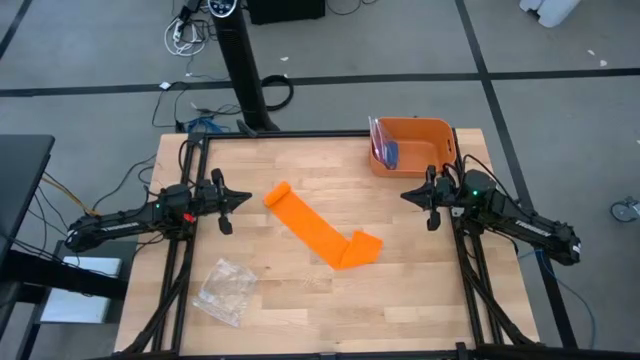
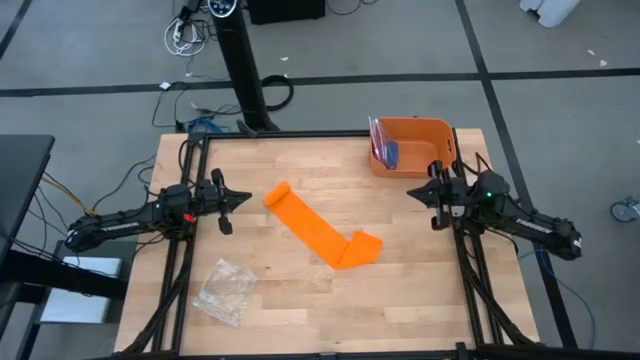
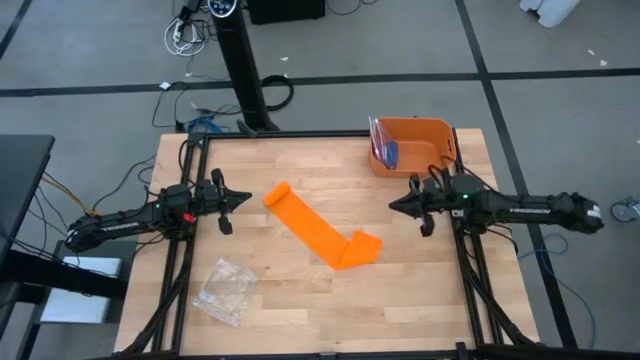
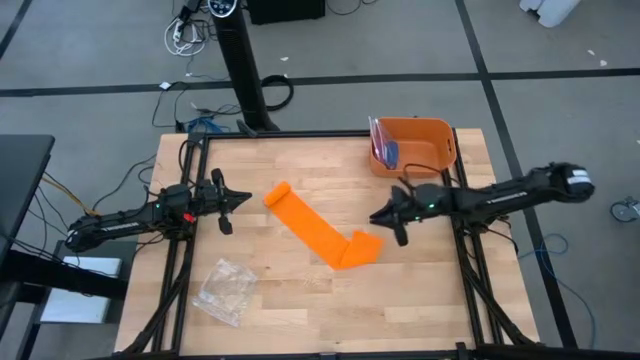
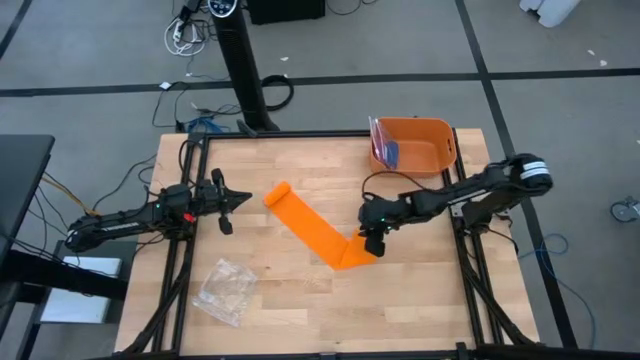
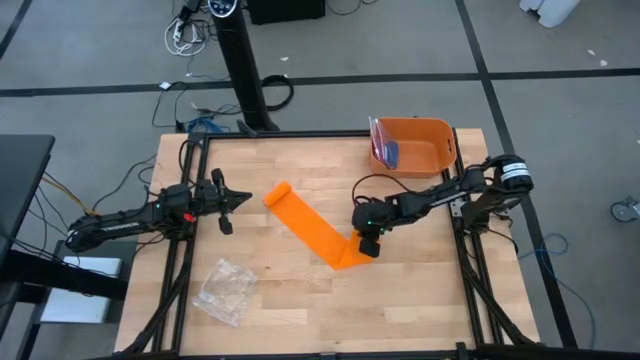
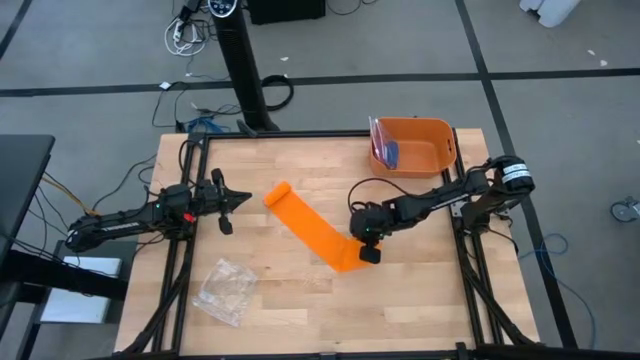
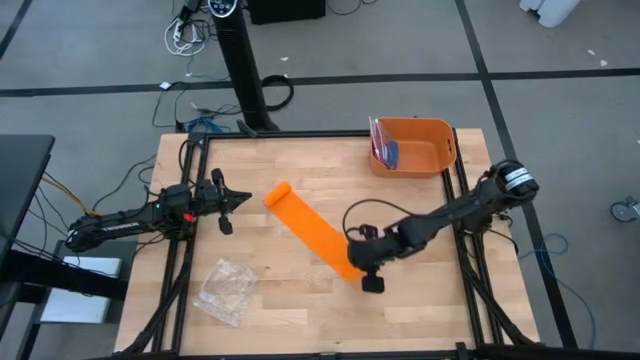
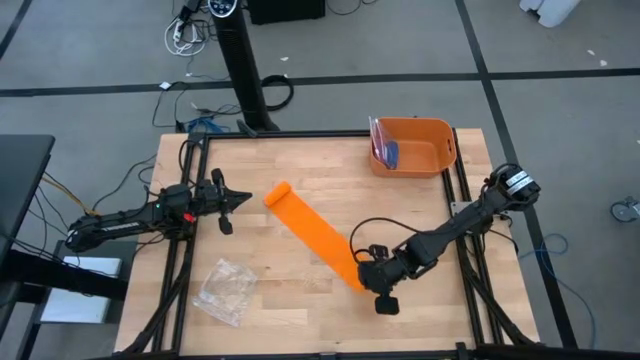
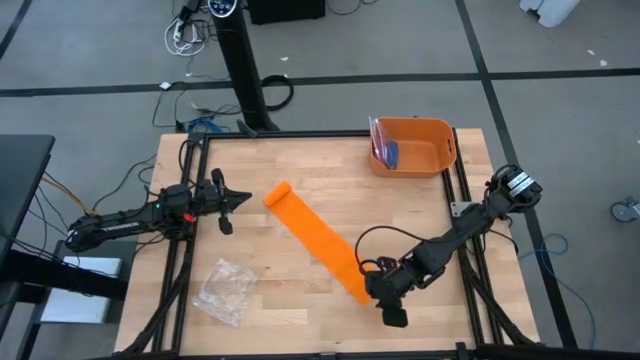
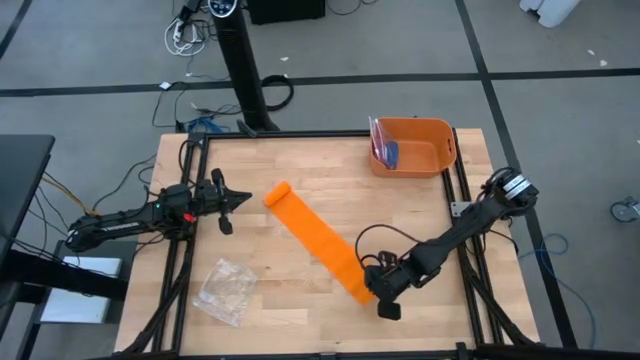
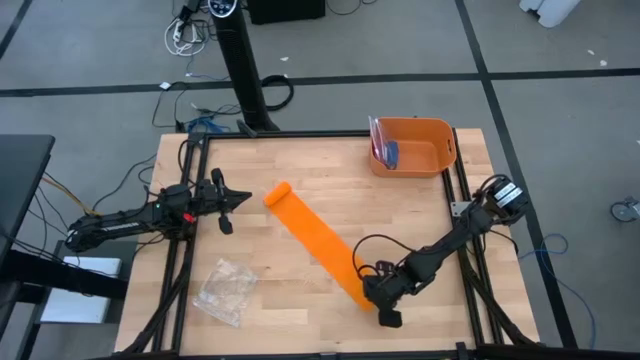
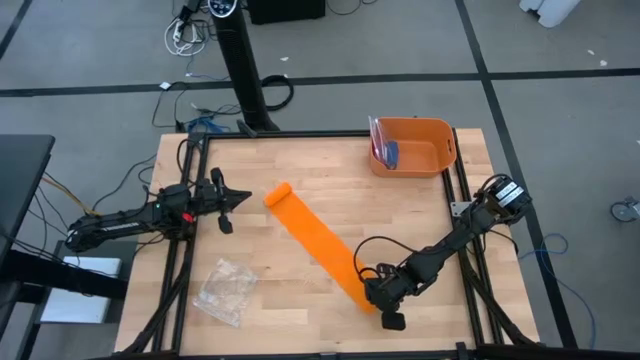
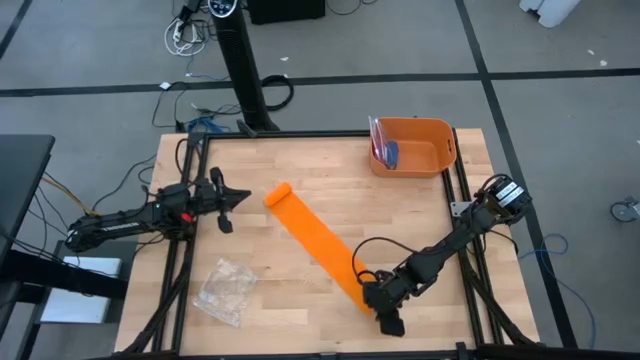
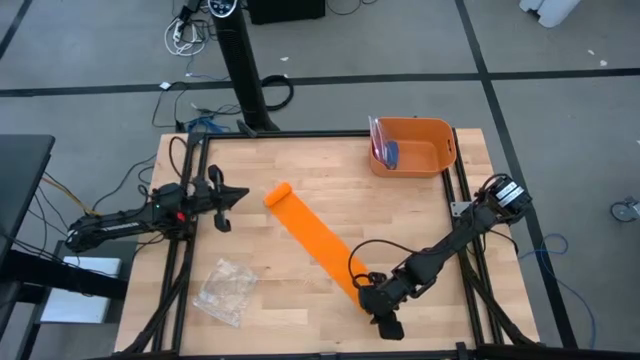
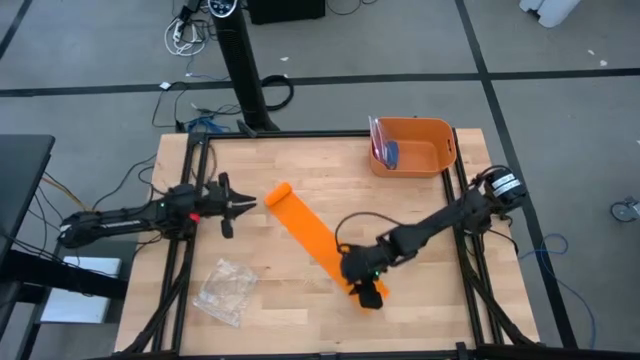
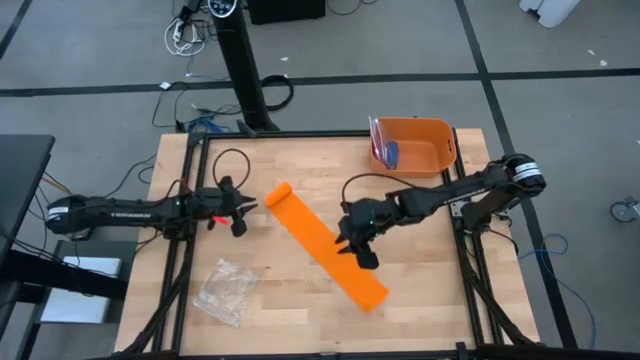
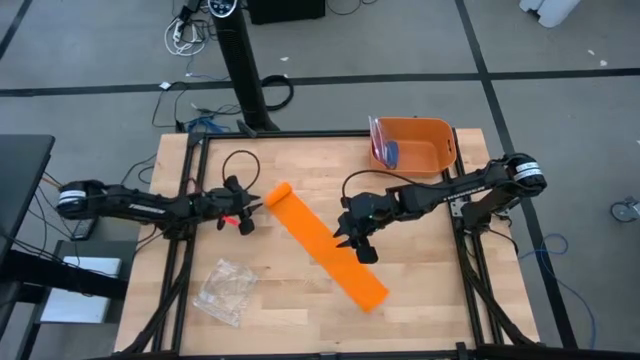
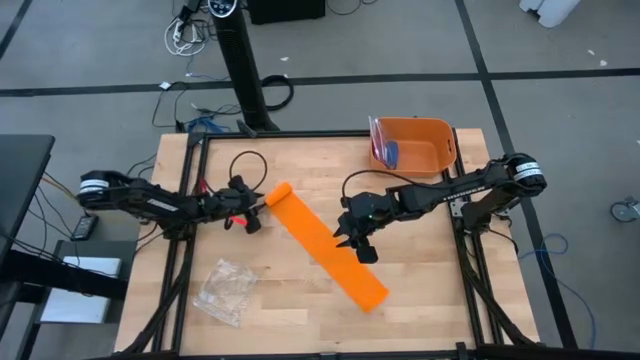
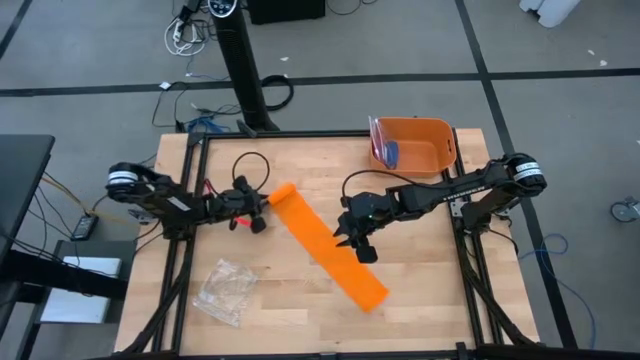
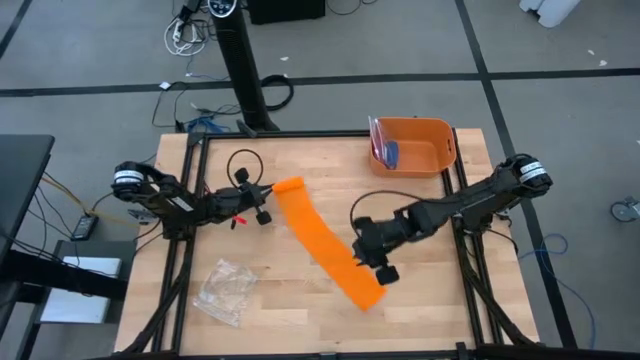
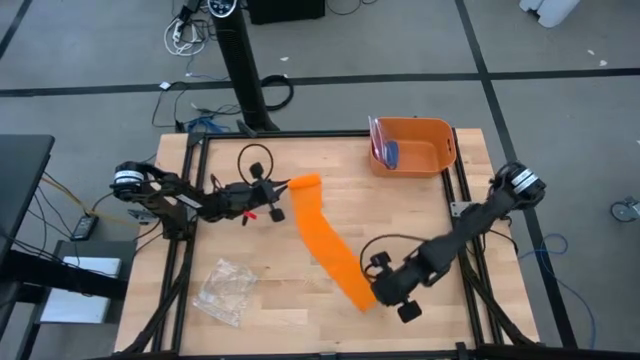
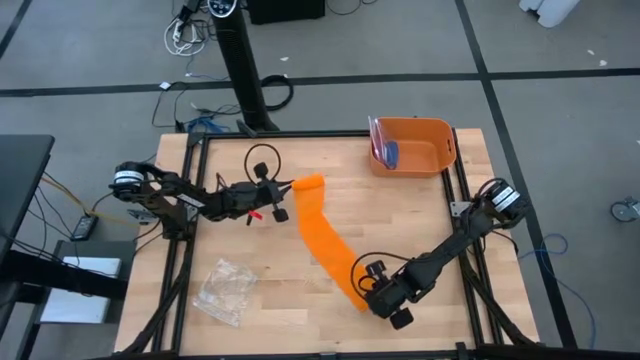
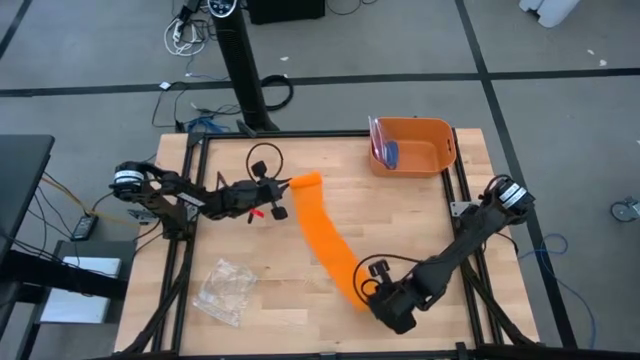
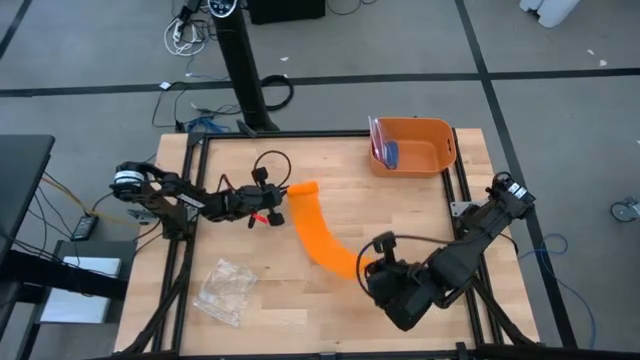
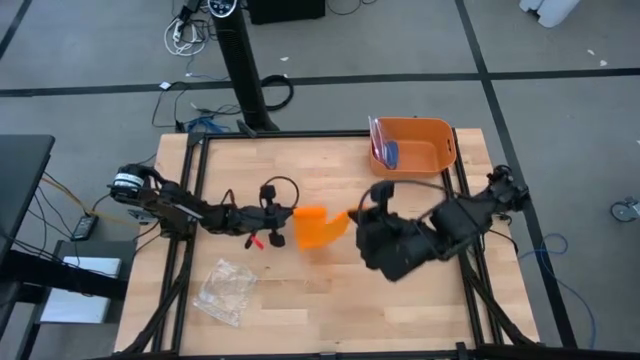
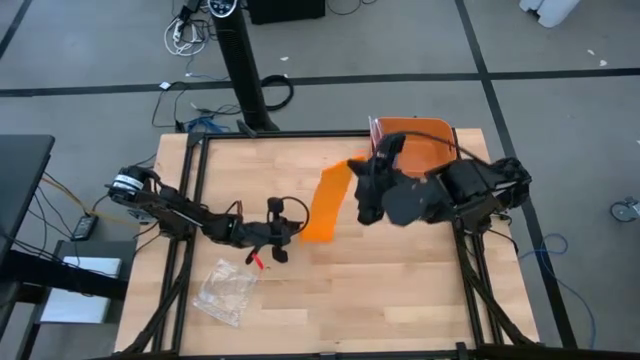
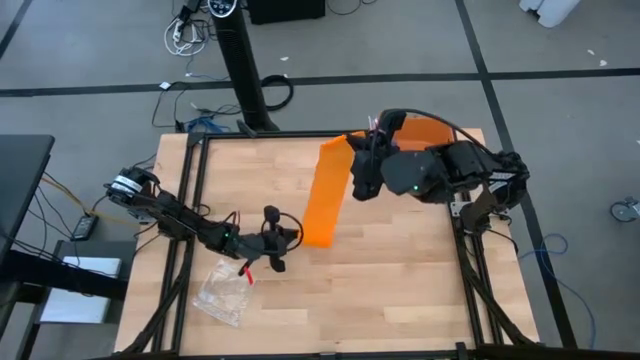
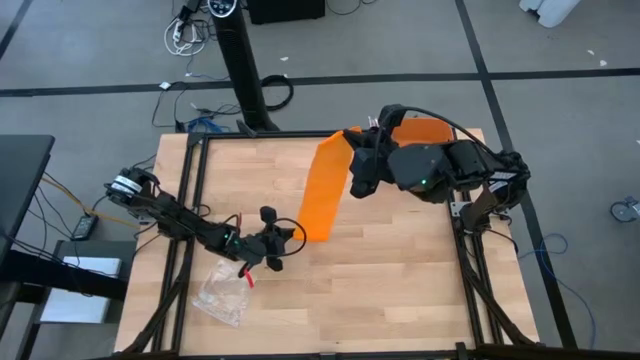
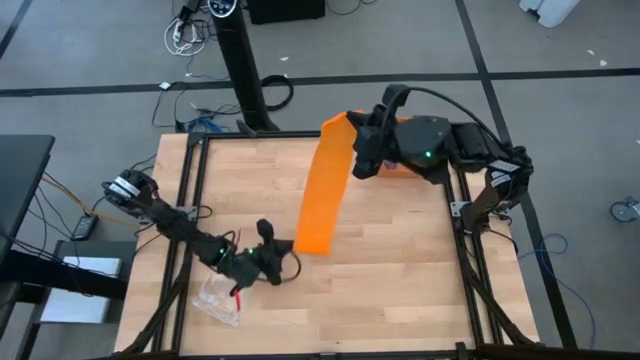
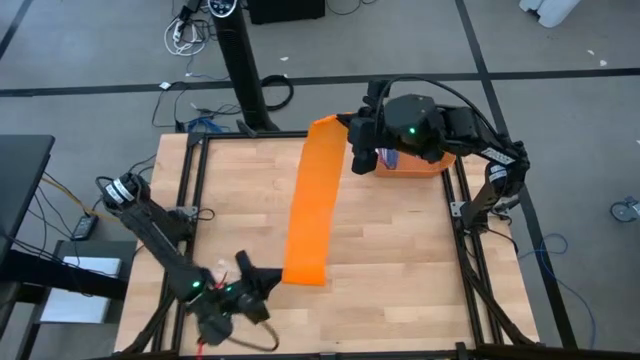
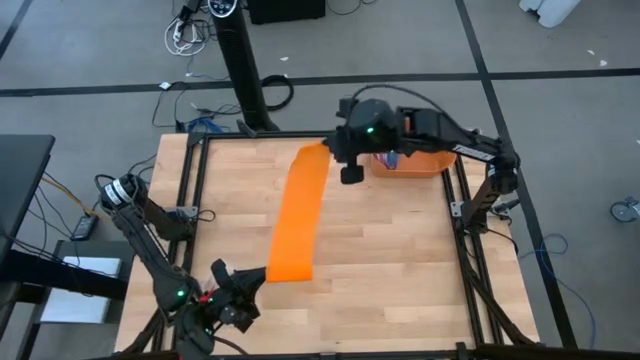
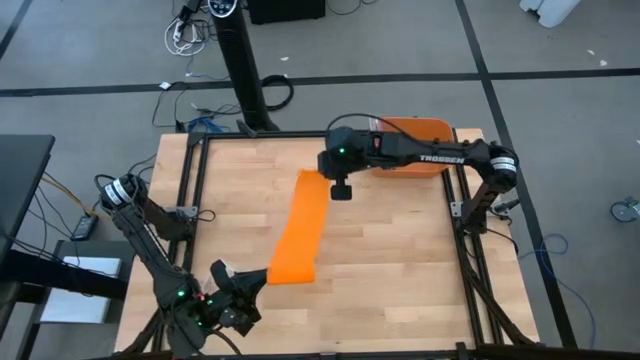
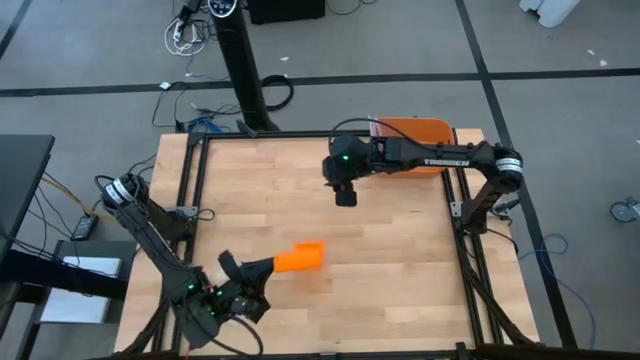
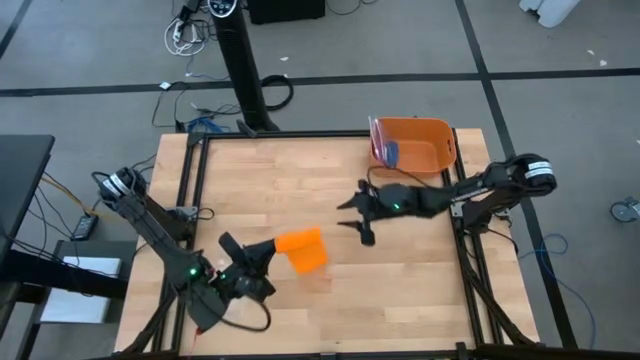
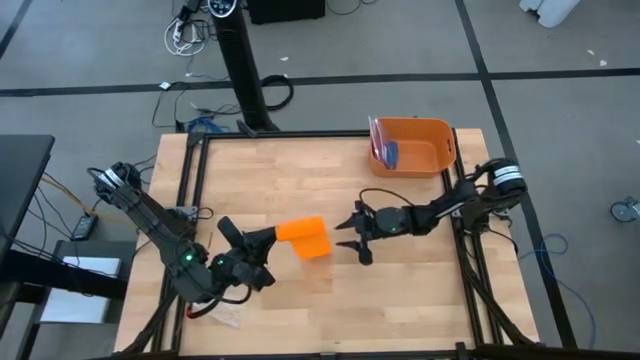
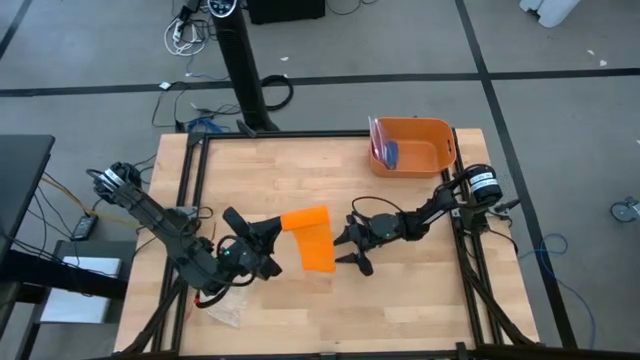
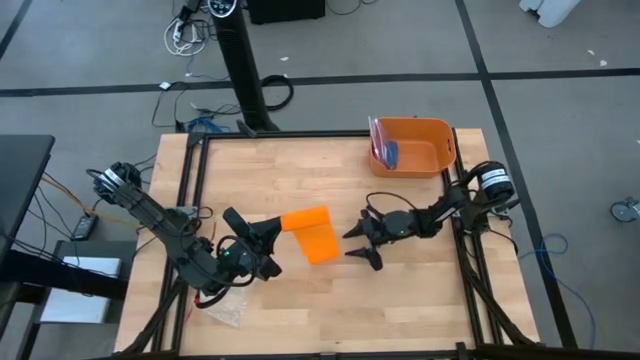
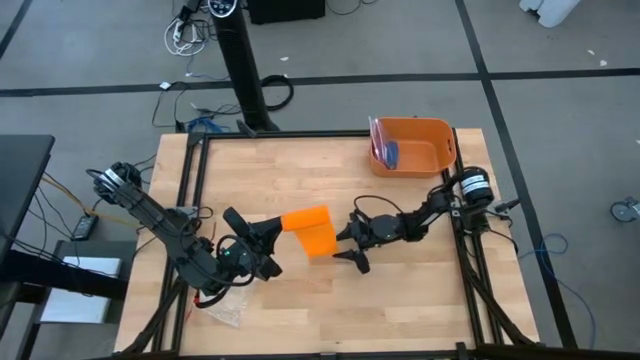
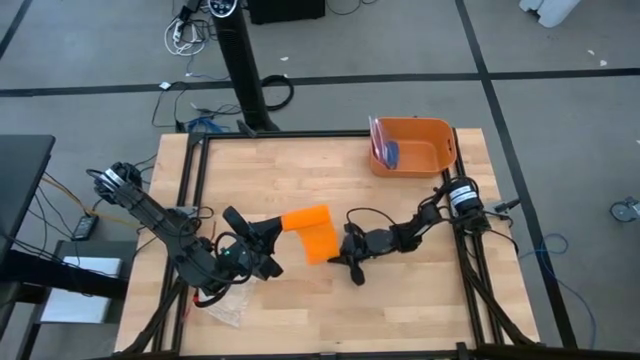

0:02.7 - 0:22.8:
Task: Roll bandage
Roll the orange bandage
